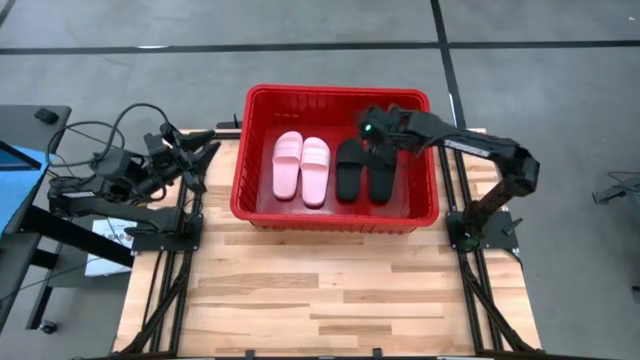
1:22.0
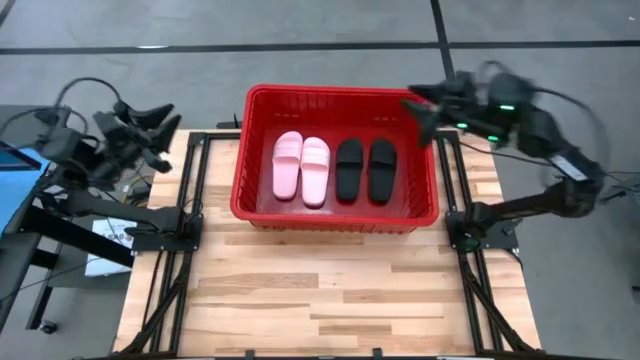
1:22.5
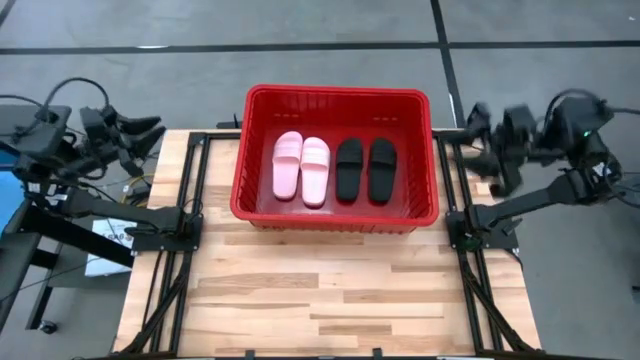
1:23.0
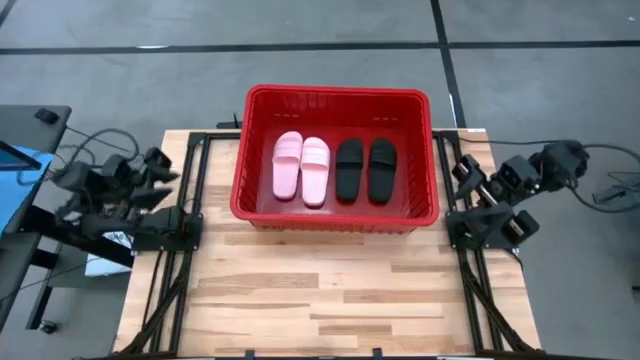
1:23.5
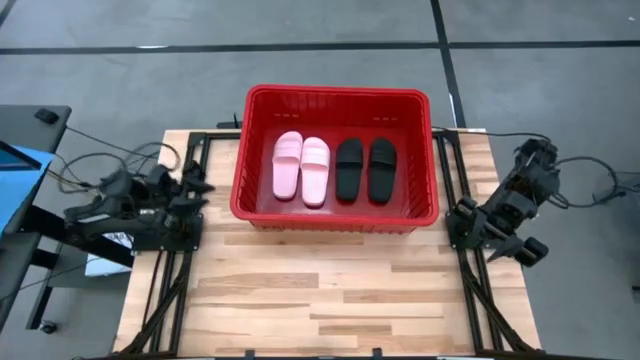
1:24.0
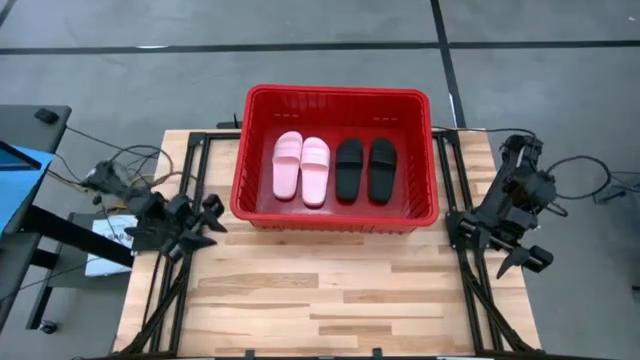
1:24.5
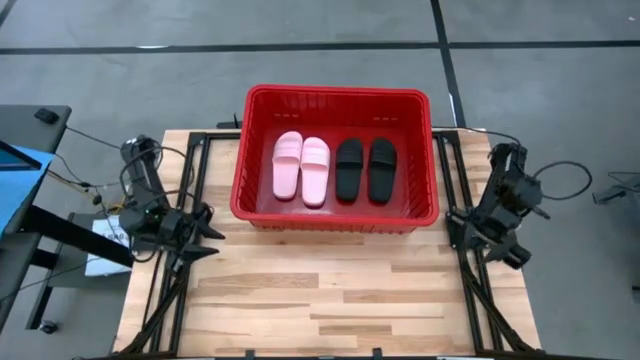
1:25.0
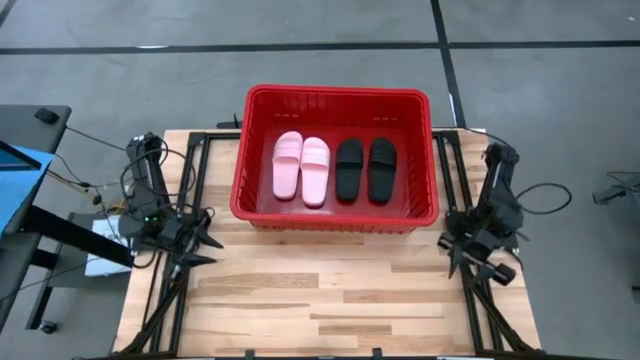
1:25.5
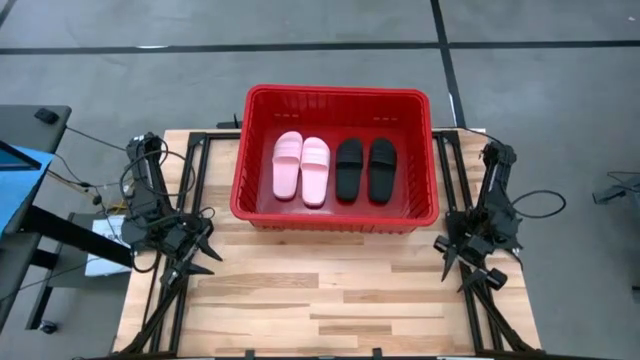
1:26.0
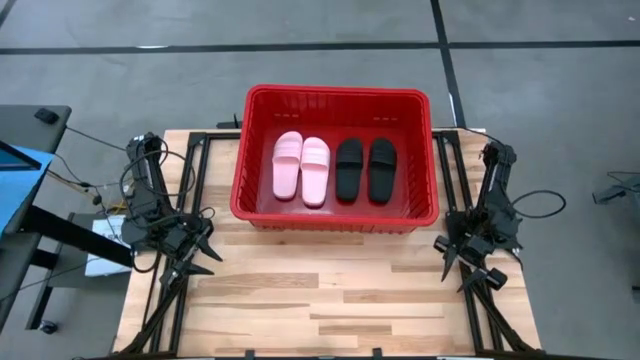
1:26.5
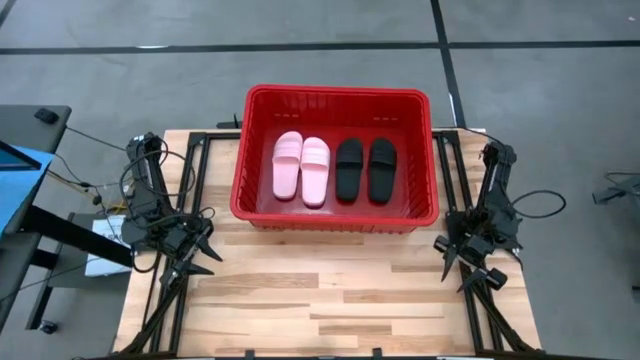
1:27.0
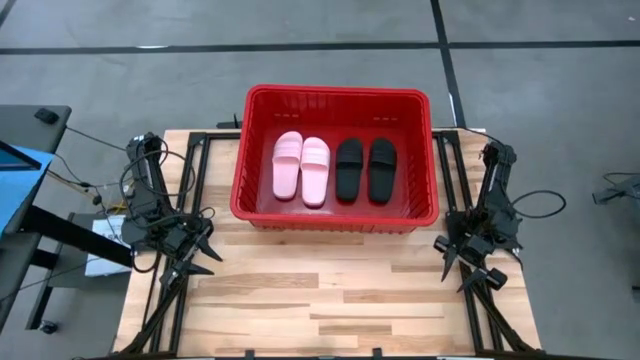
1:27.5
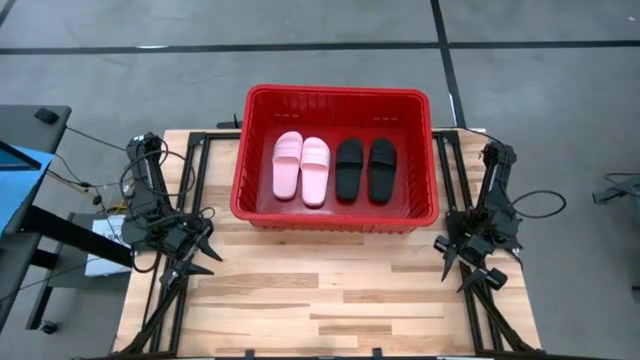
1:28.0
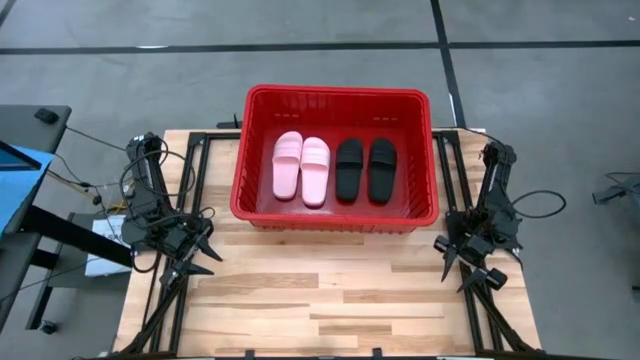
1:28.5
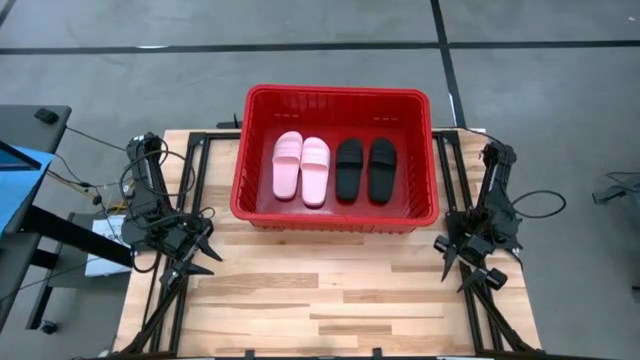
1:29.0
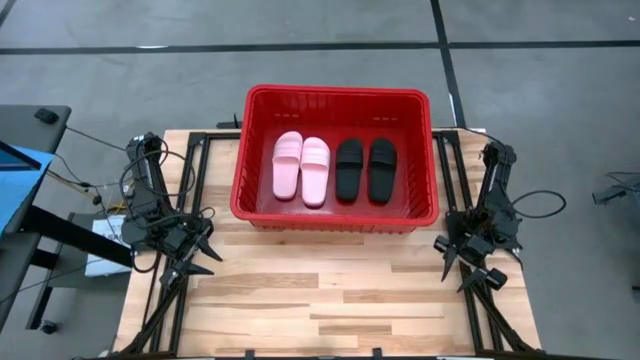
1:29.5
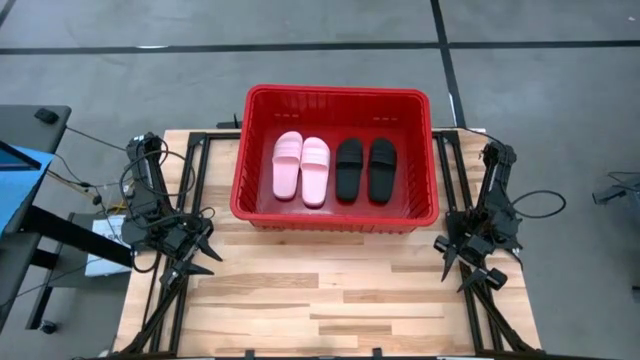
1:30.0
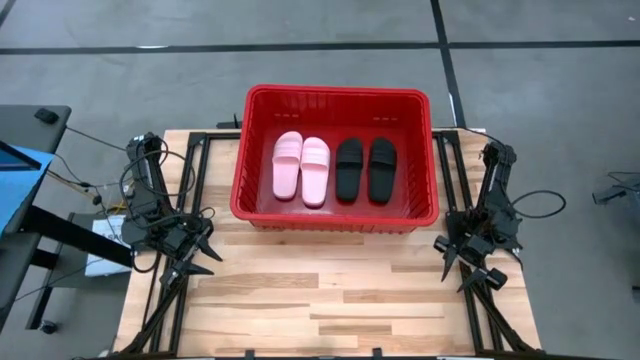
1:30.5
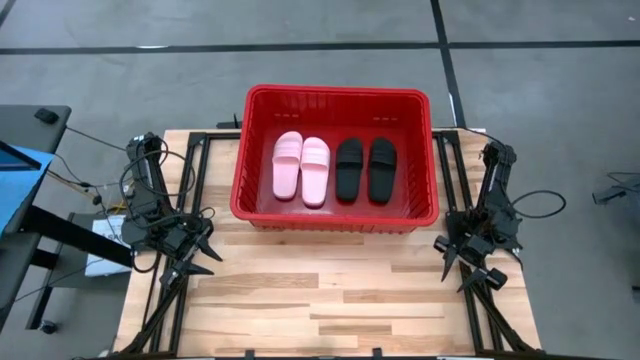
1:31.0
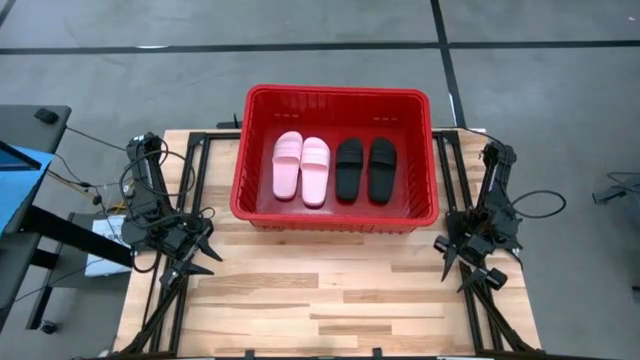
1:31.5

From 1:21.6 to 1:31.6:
Task: Pick and place slides into bin
Return to Home Position

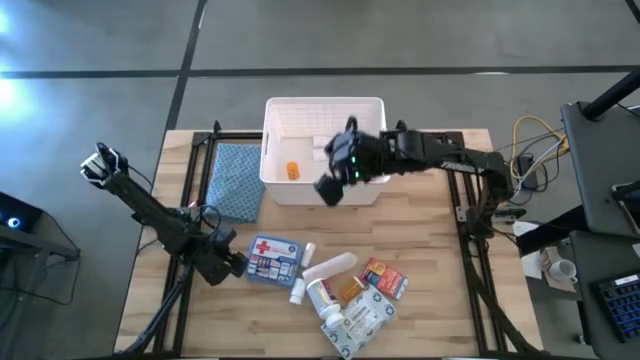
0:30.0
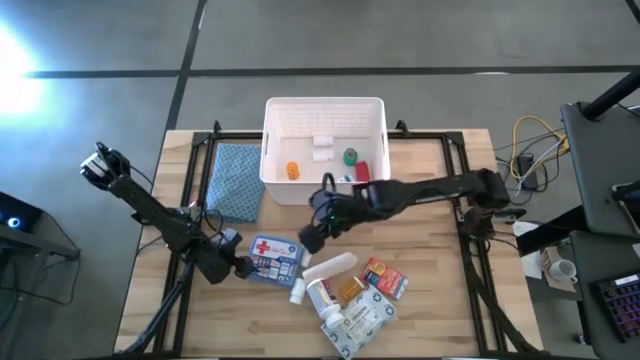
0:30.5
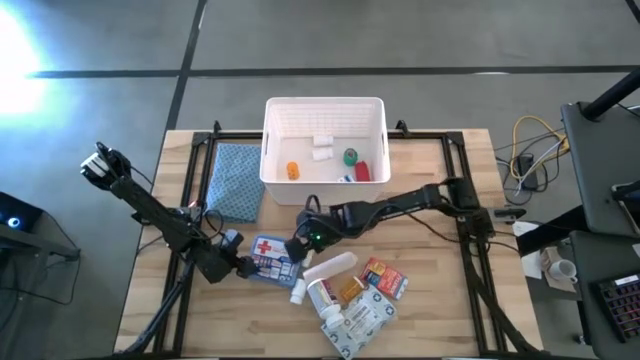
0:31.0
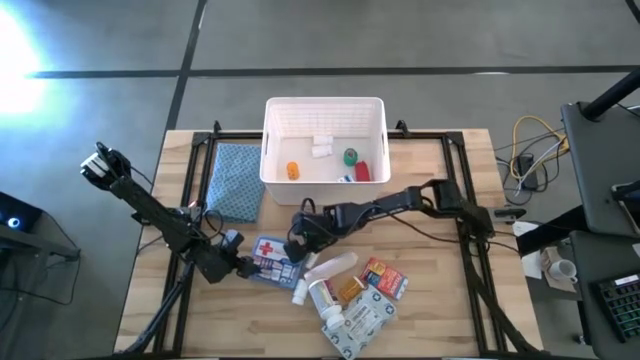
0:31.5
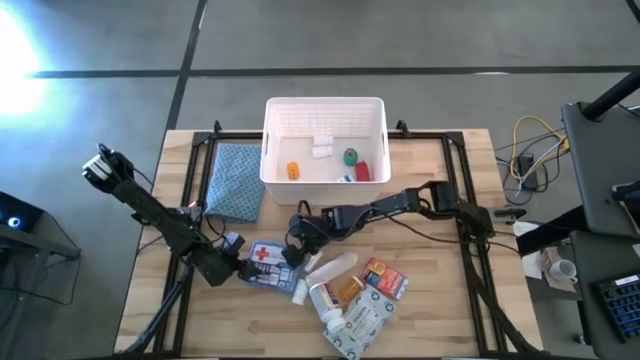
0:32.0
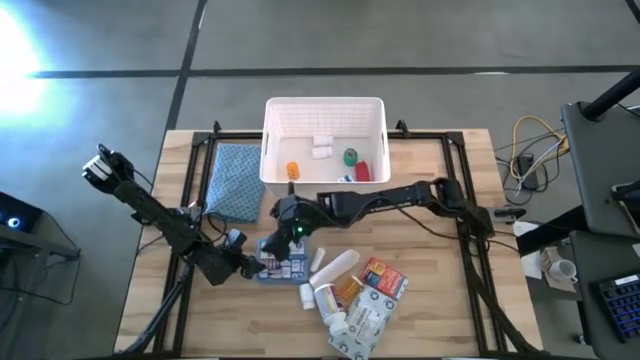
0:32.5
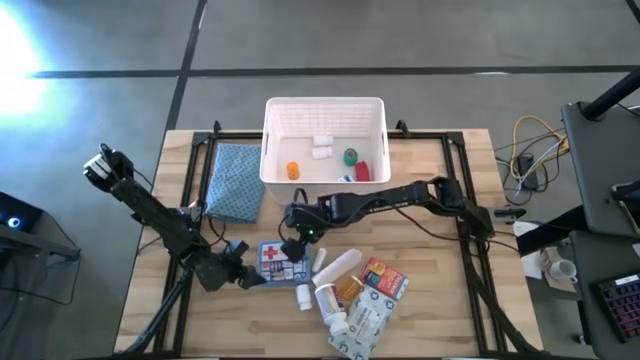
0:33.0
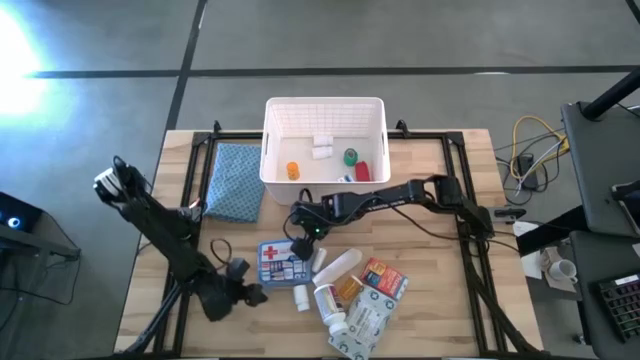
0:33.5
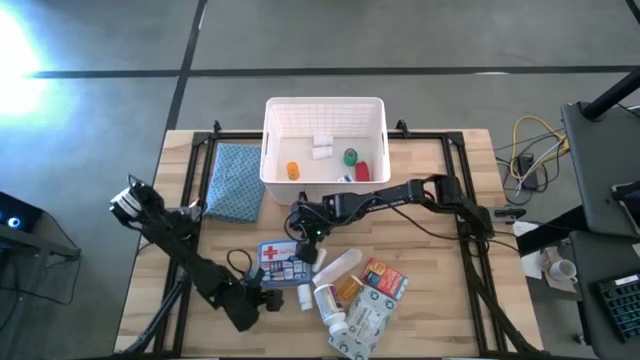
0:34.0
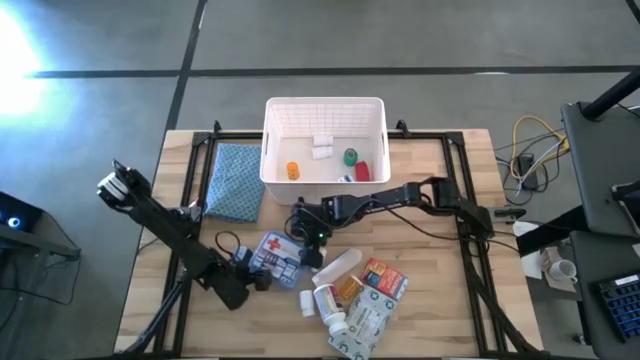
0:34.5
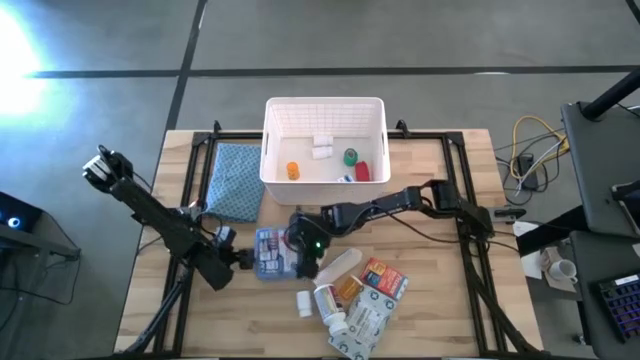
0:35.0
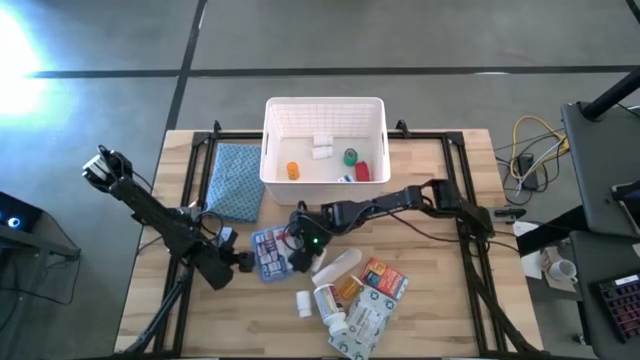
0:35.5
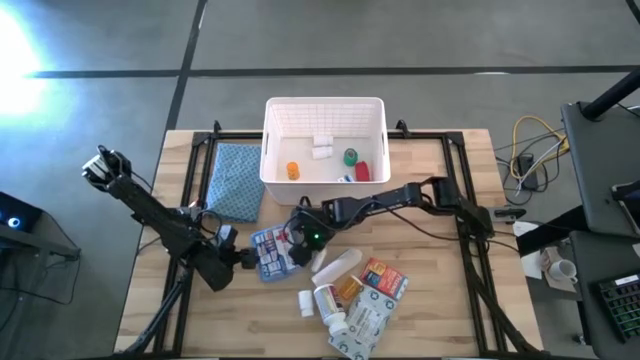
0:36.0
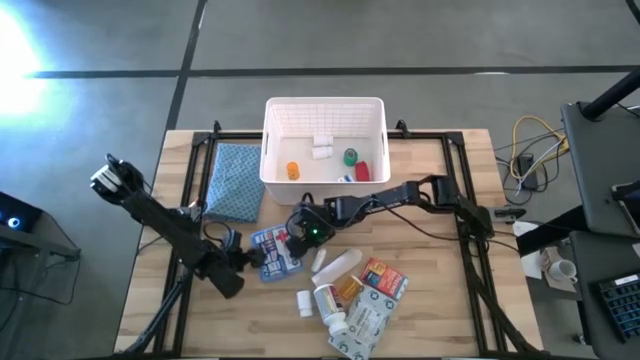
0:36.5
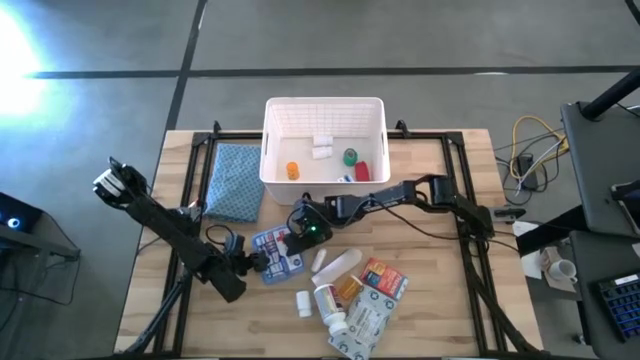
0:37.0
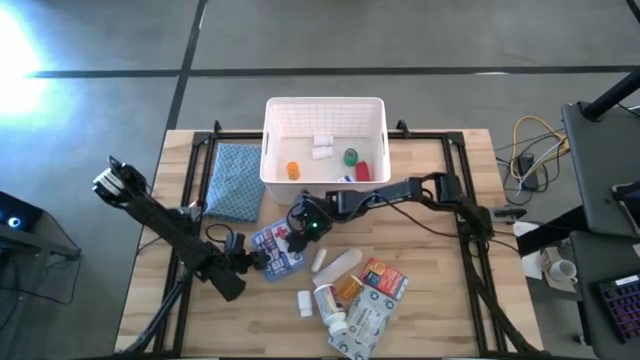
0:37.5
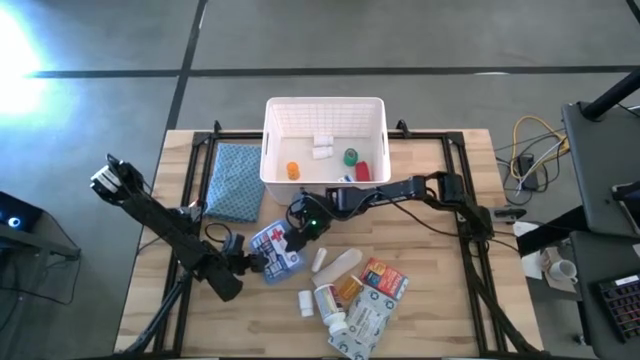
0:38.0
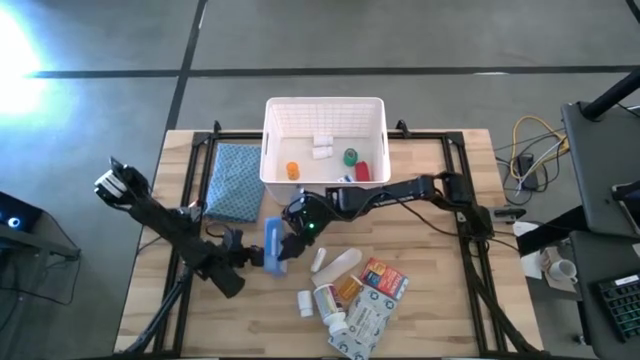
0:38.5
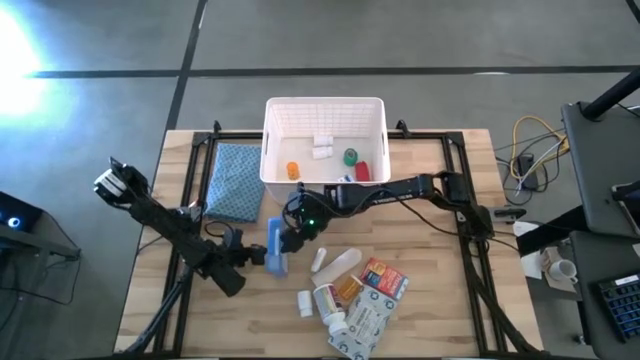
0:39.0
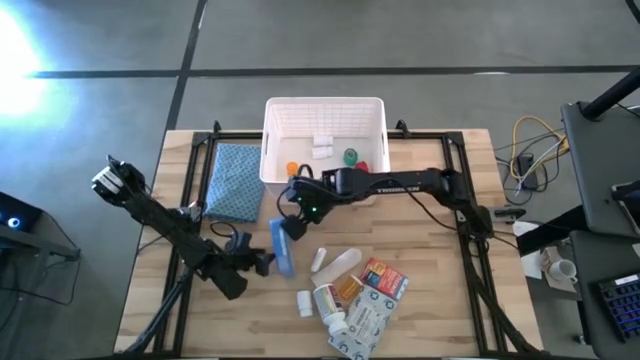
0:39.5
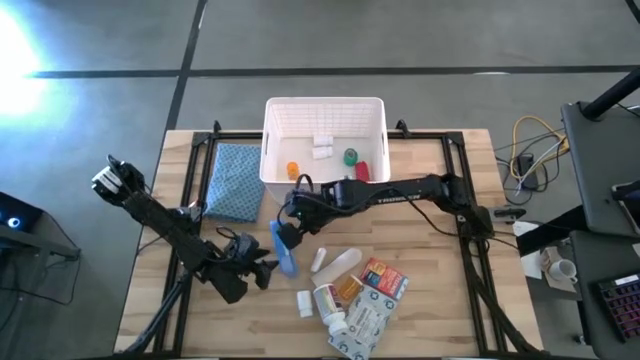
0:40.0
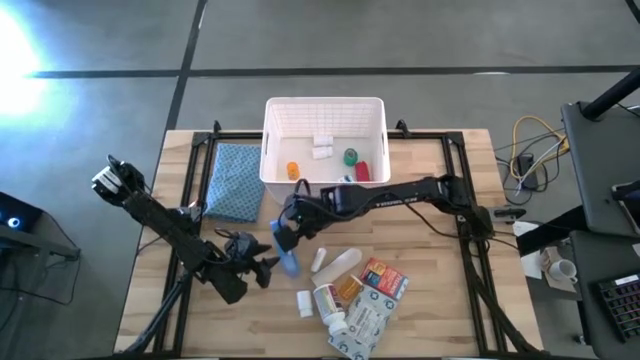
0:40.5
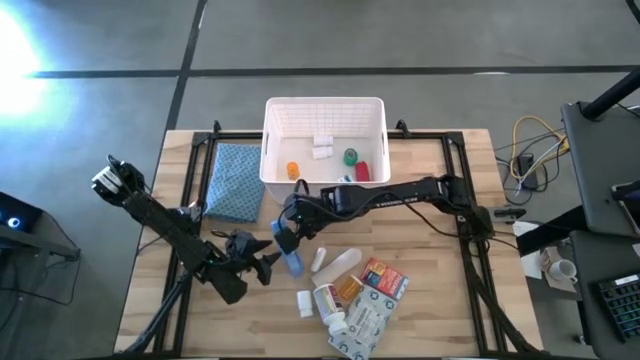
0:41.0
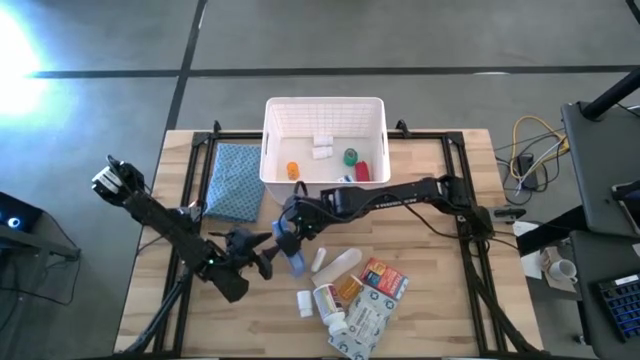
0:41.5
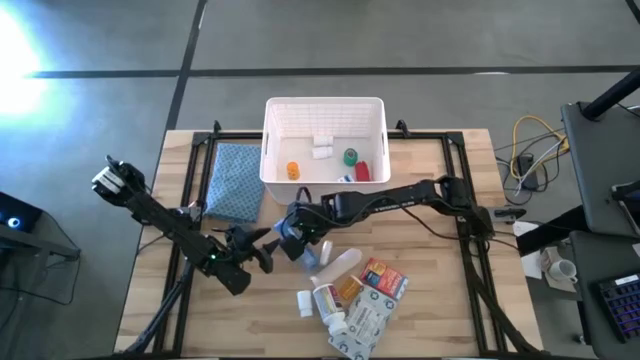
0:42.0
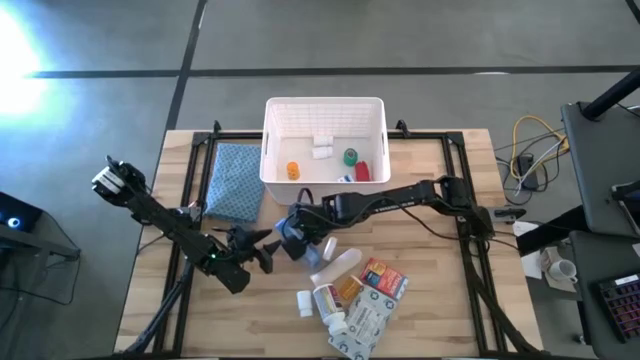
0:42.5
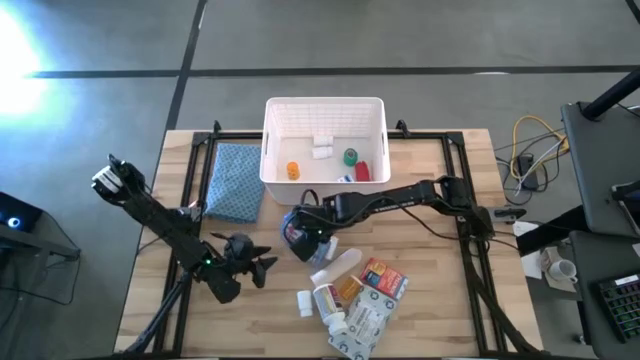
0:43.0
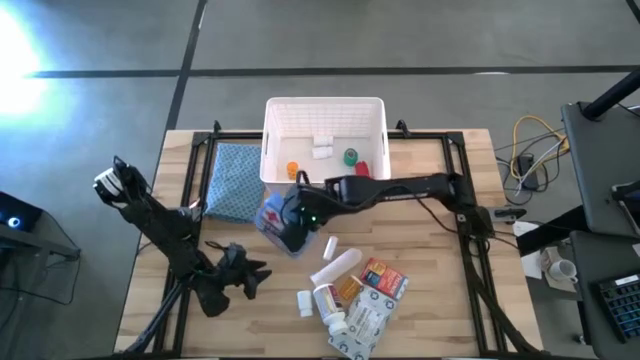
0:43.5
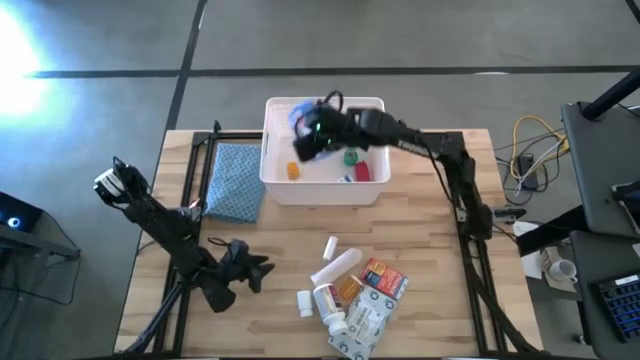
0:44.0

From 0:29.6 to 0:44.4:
Task: Pick & place medical supplies in basket/bin
Put the blue first aid kit into the white bin
